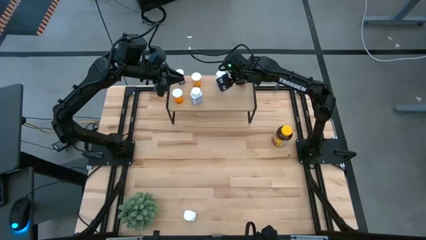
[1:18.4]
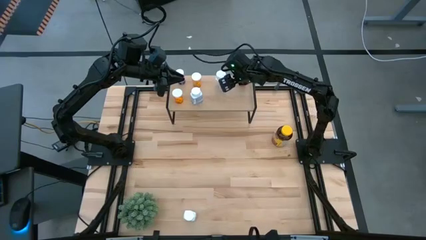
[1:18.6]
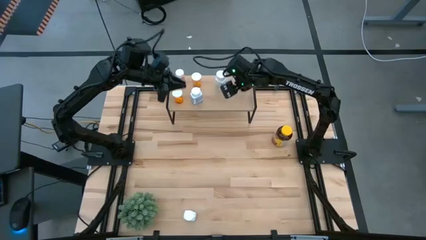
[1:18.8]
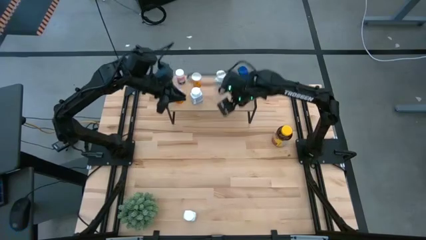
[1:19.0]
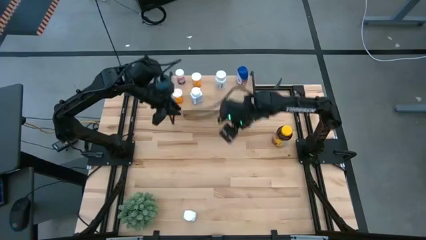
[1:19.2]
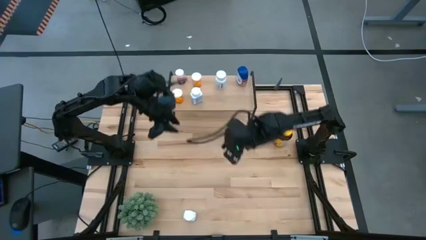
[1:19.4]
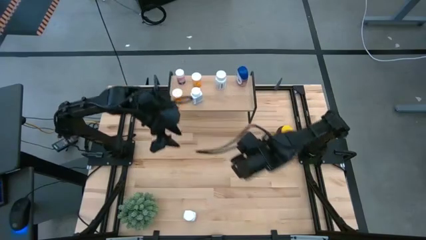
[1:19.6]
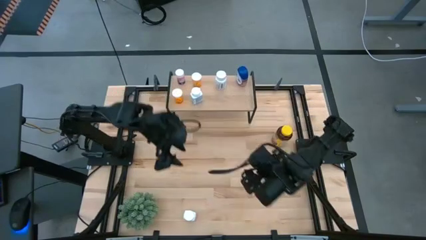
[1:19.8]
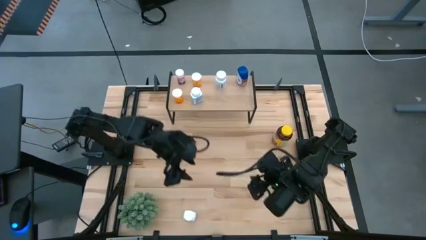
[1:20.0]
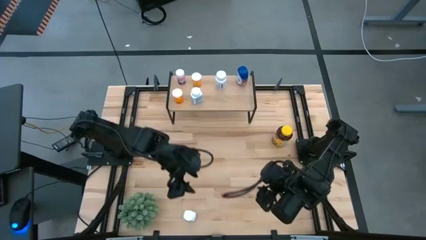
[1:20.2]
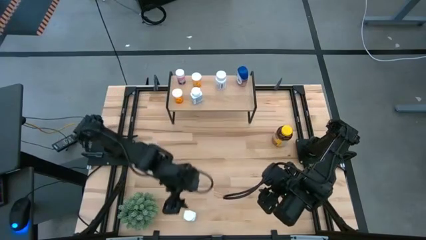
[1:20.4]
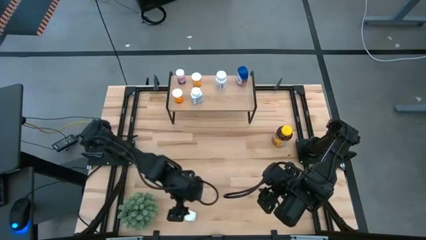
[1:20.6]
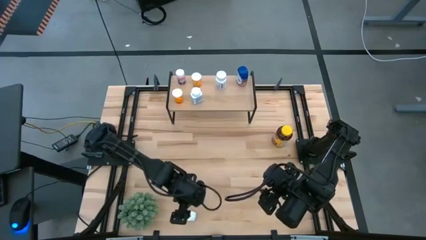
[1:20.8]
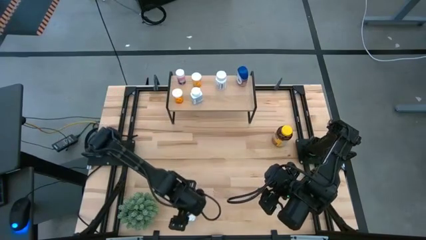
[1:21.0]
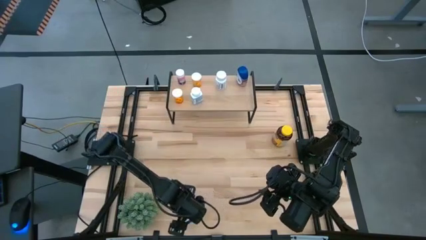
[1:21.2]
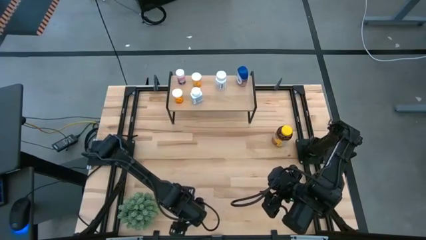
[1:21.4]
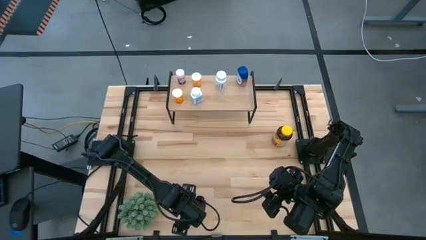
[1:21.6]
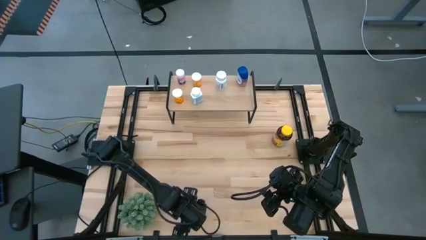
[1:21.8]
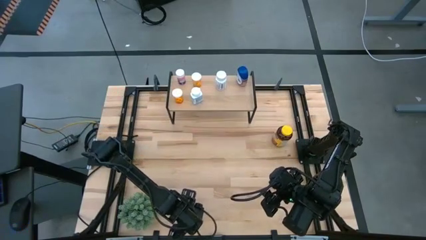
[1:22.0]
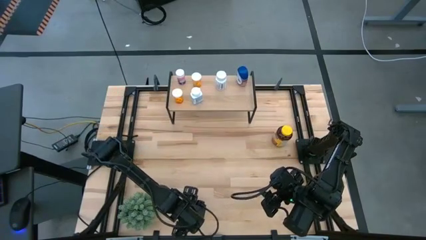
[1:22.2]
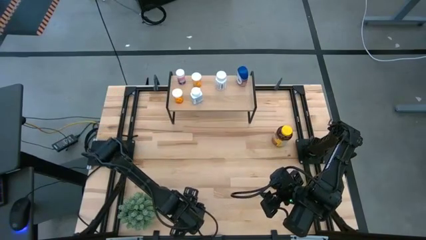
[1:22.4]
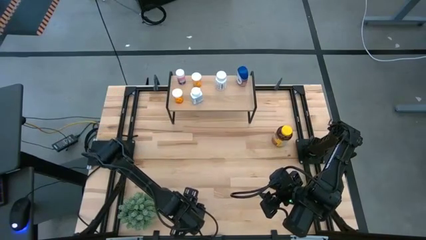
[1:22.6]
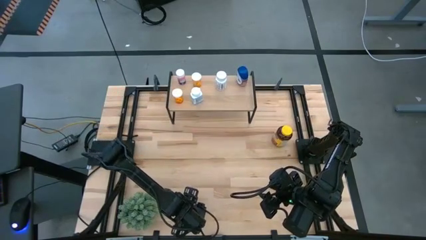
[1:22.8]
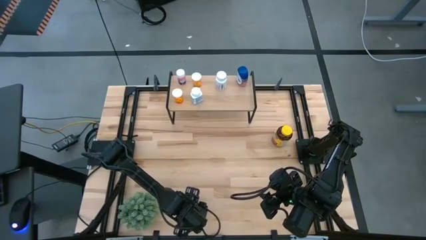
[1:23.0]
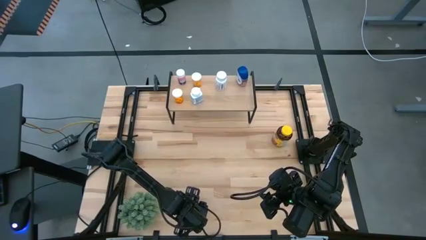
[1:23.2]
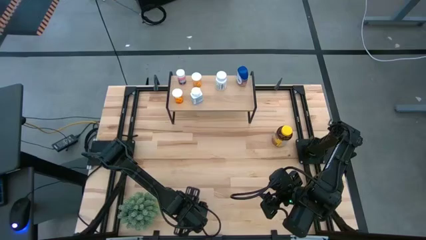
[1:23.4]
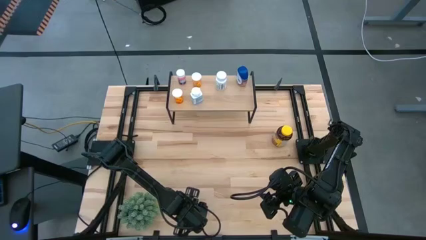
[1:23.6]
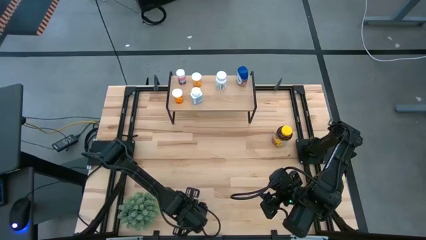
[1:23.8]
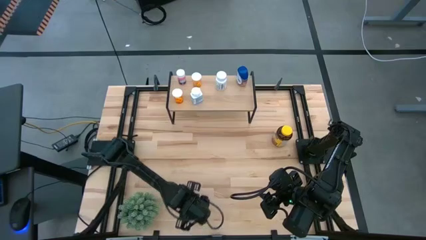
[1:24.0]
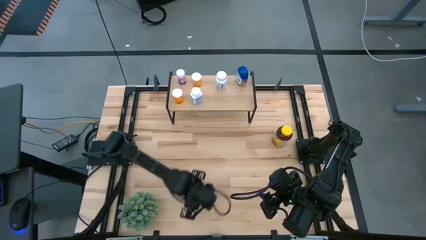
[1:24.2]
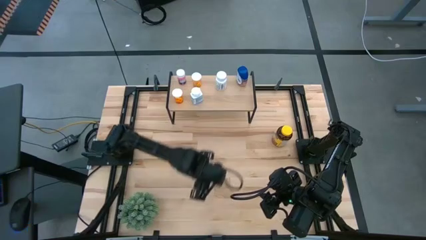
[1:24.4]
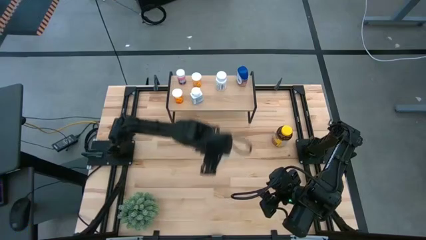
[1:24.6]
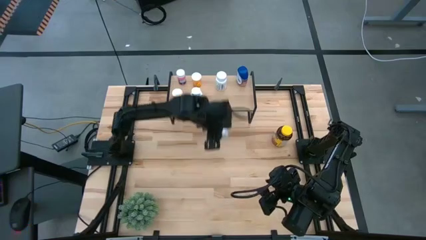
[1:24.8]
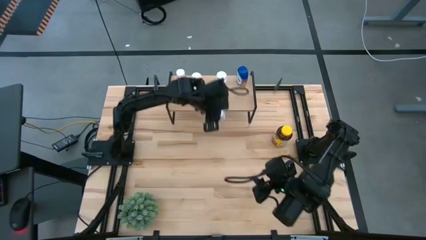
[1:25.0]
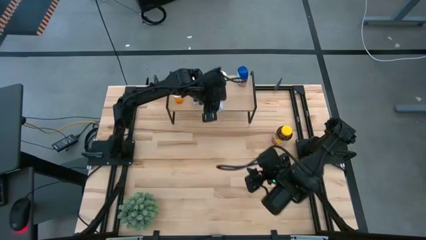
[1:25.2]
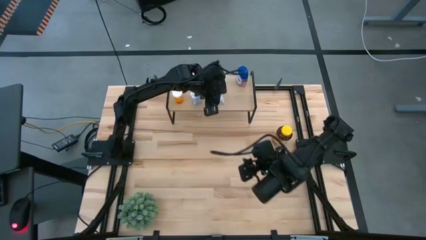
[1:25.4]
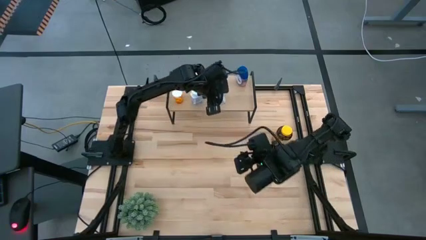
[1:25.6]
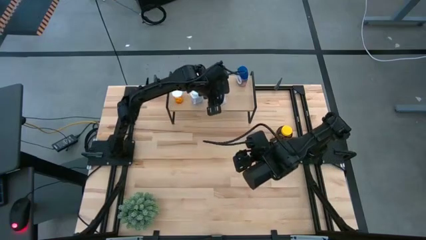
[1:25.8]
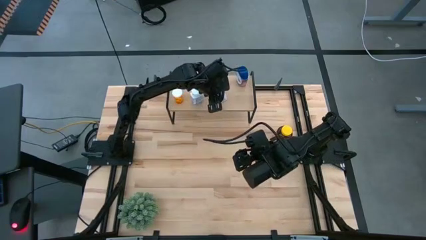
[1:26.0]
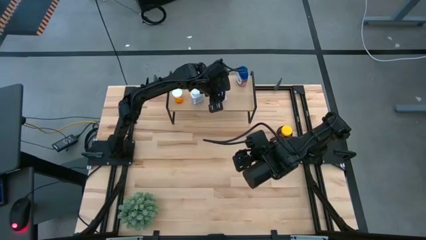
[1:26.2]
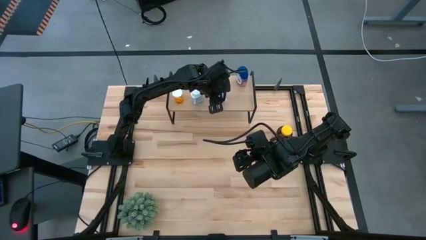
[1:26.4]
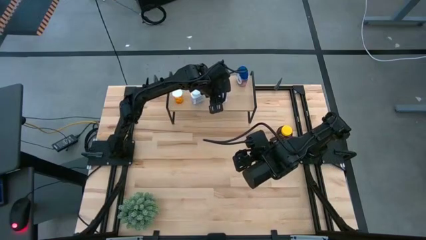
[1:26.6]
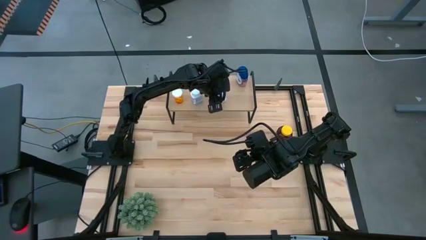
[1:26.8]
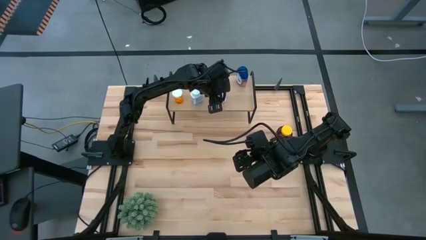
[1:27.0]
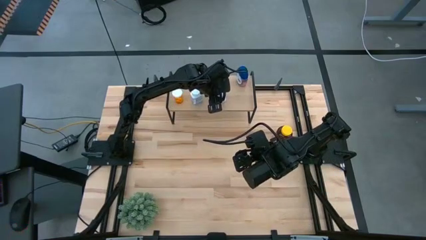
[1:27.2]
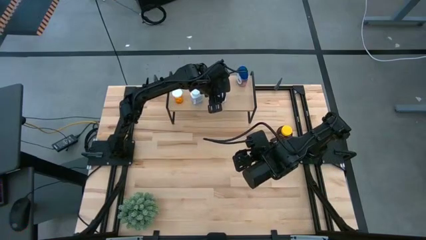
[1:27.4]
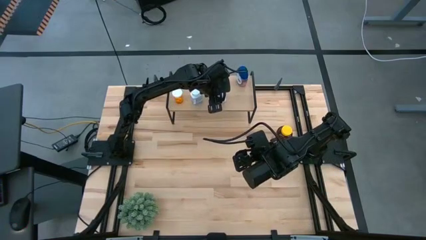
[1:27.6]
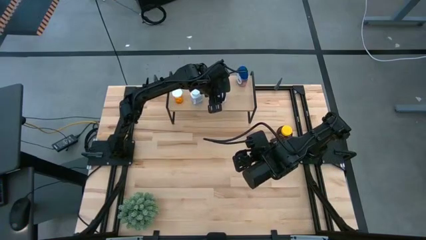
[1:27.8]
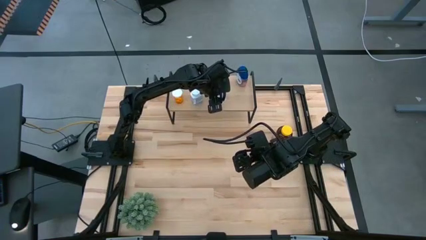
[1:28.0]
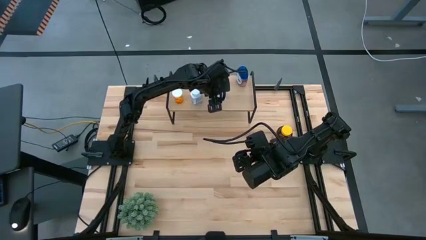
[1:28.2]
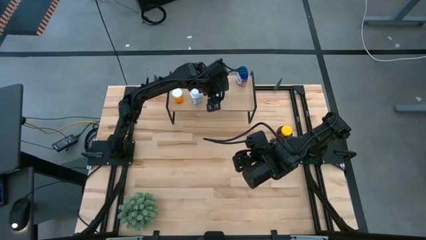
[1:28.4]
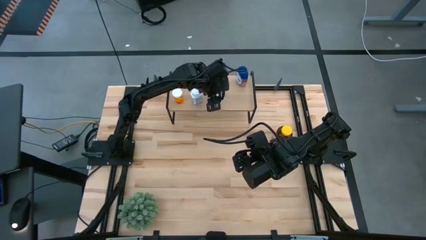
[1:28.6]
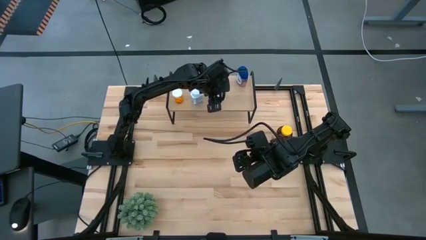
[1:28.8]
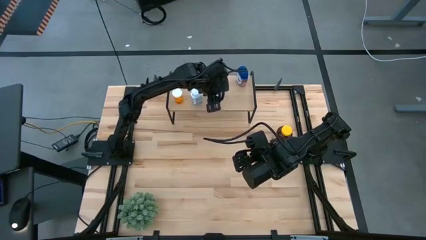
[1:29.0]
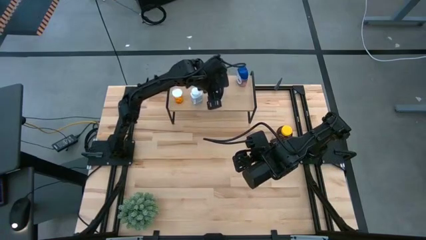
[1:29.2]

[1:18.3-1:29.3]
Task: Pick and place medicine bottles onto shelf by color
Put the white and blue medicine bottle on the shelf aligned with the other white medicine bottle
